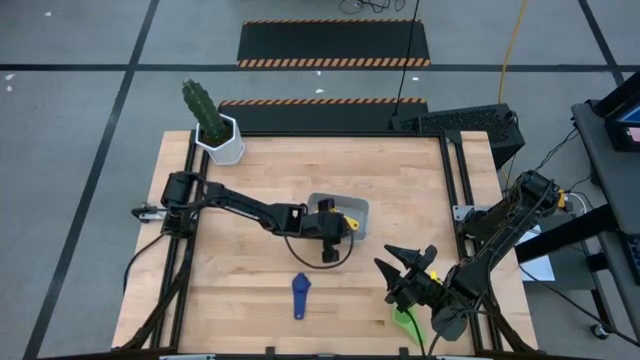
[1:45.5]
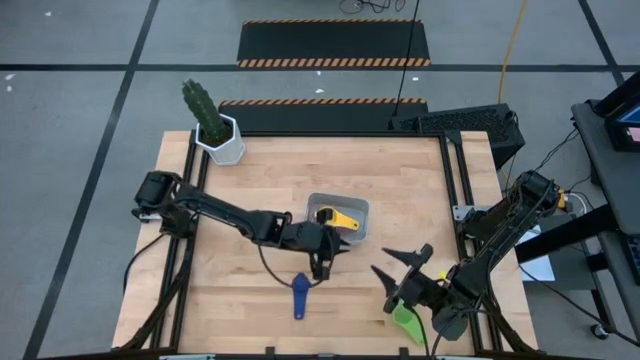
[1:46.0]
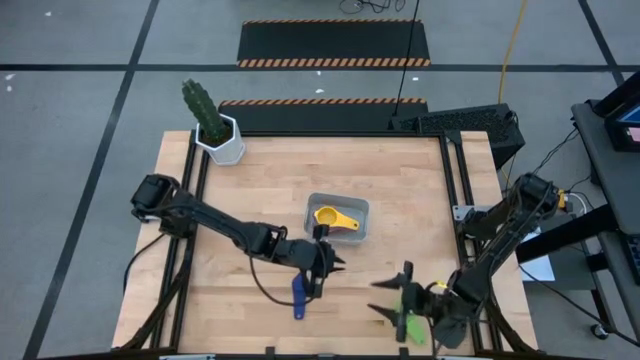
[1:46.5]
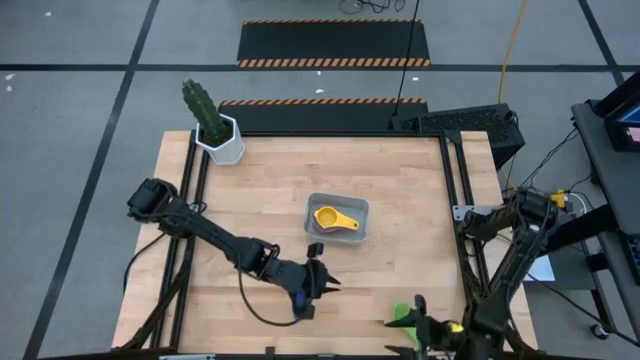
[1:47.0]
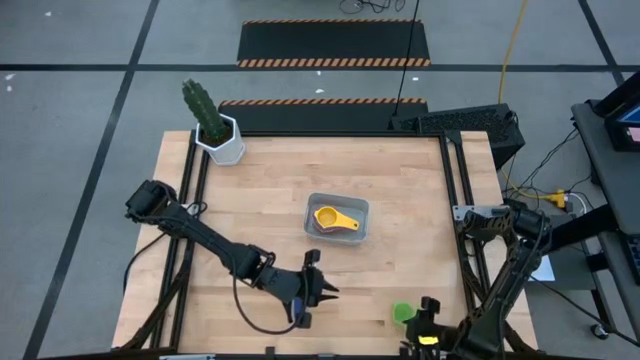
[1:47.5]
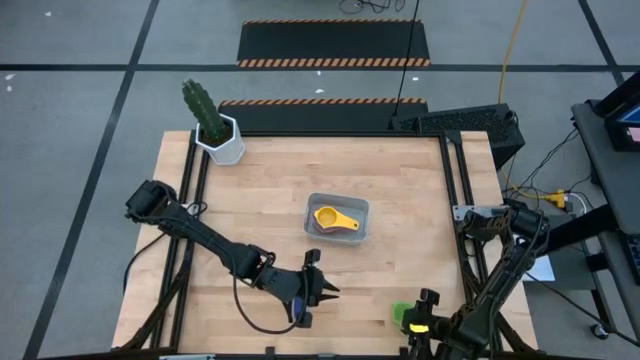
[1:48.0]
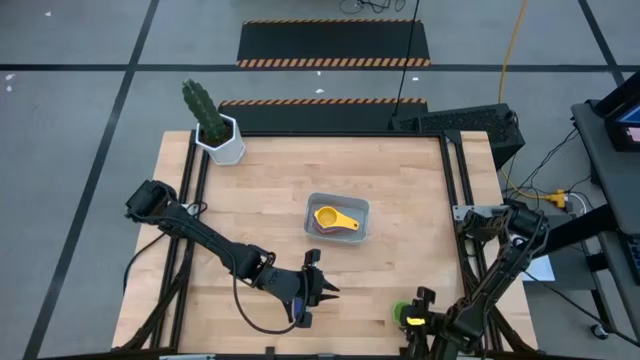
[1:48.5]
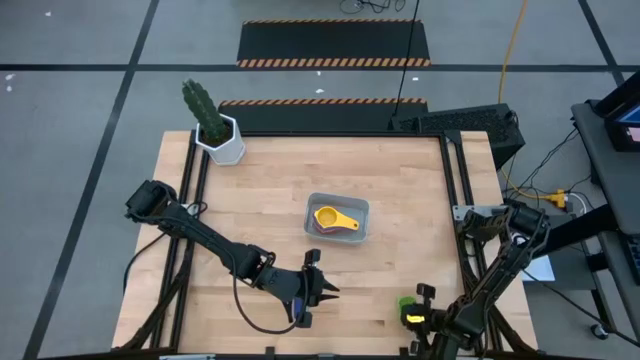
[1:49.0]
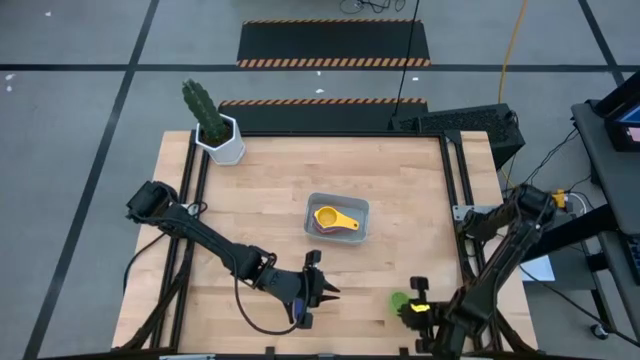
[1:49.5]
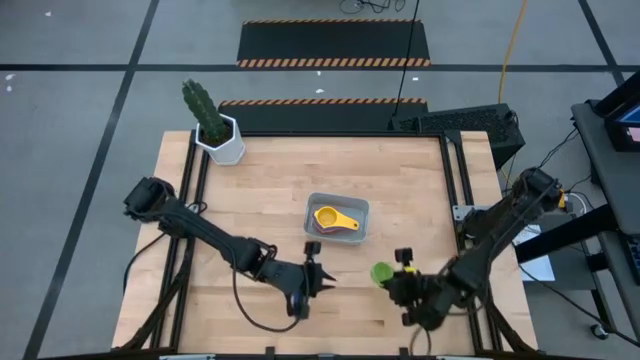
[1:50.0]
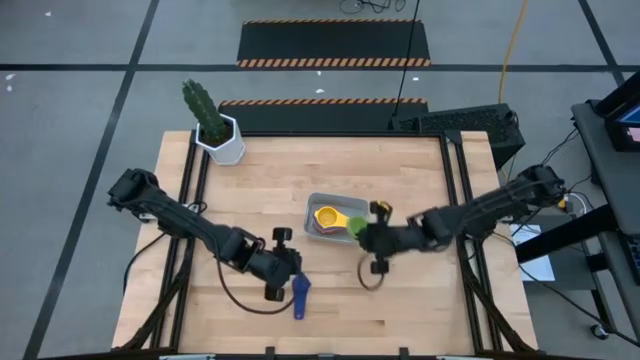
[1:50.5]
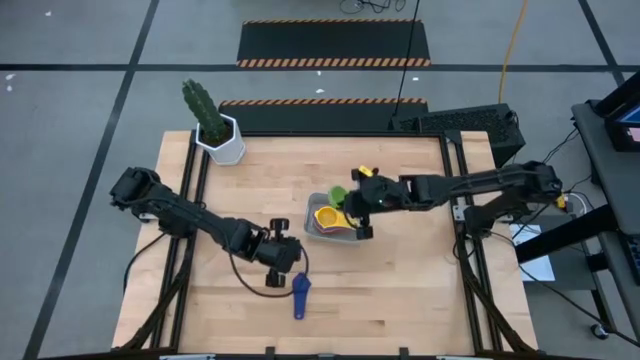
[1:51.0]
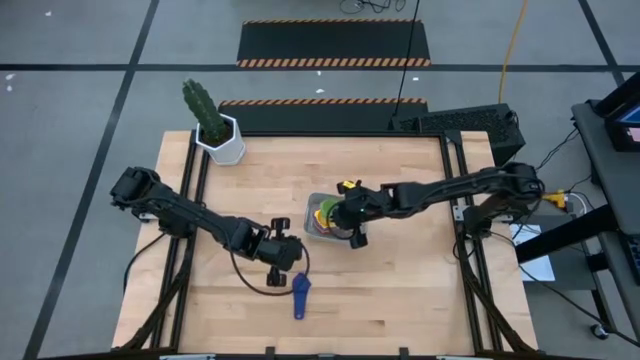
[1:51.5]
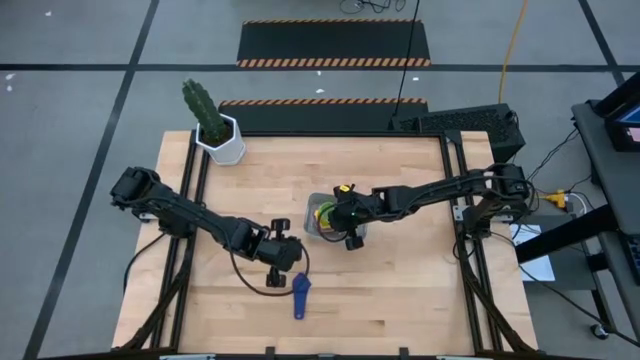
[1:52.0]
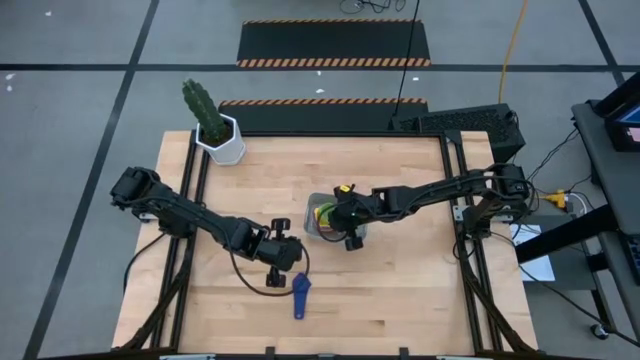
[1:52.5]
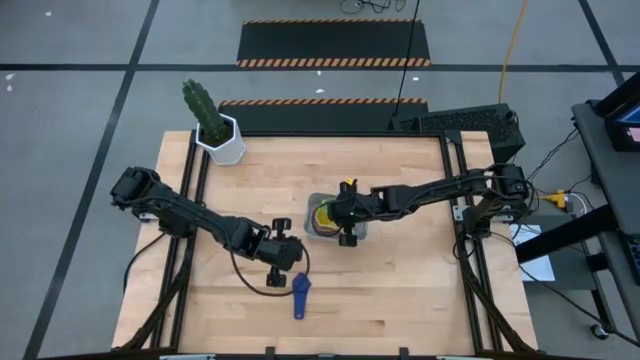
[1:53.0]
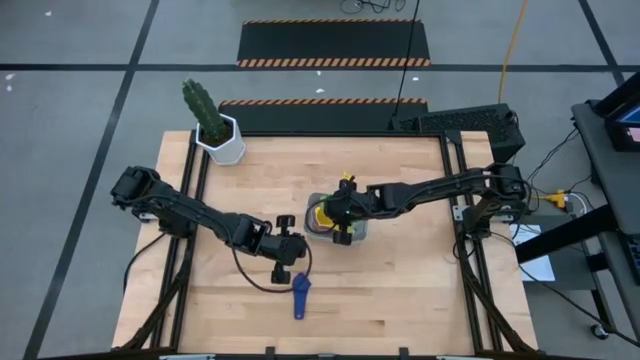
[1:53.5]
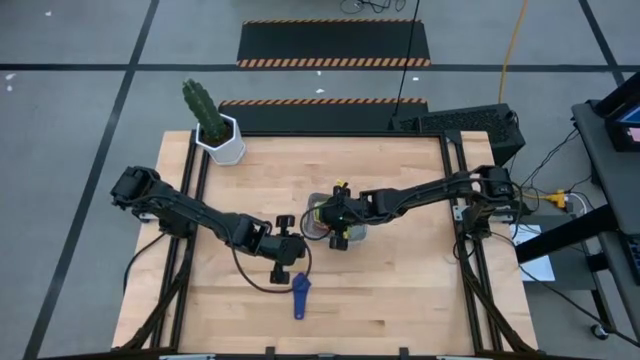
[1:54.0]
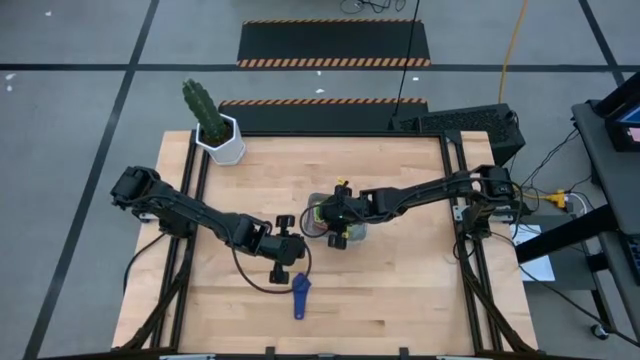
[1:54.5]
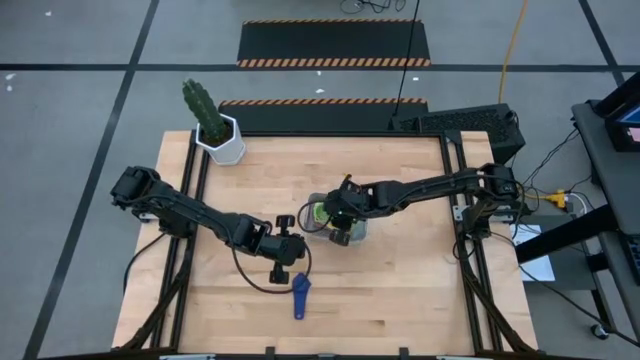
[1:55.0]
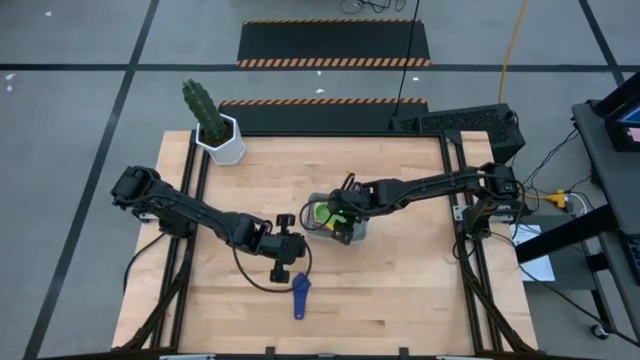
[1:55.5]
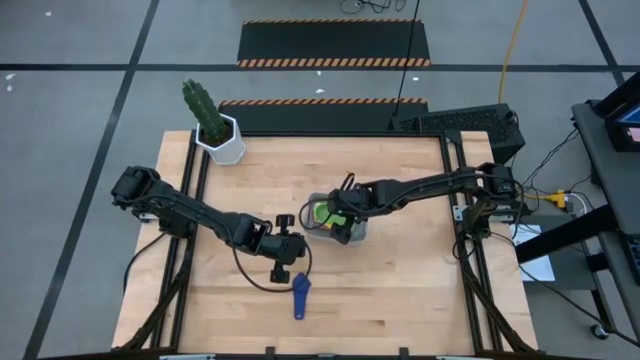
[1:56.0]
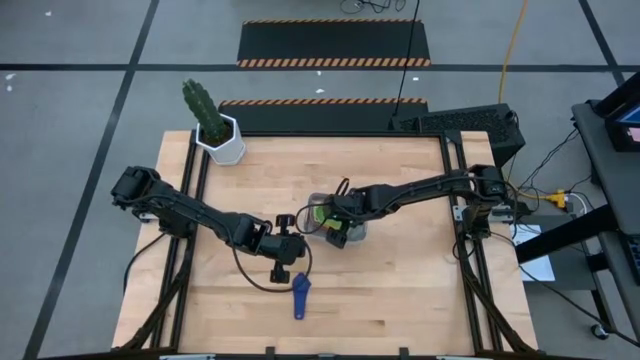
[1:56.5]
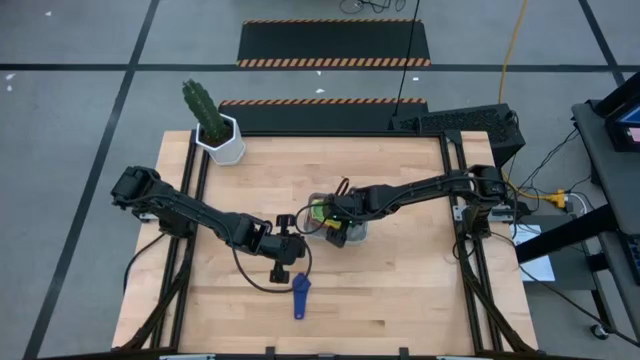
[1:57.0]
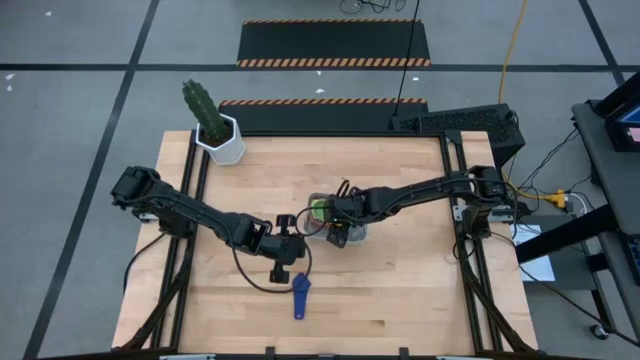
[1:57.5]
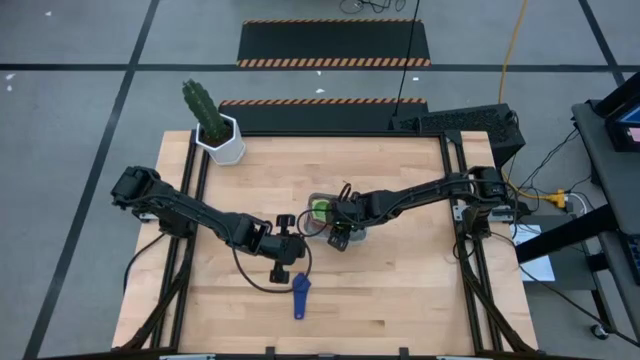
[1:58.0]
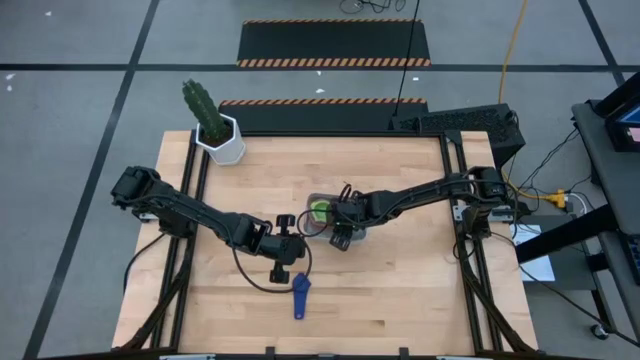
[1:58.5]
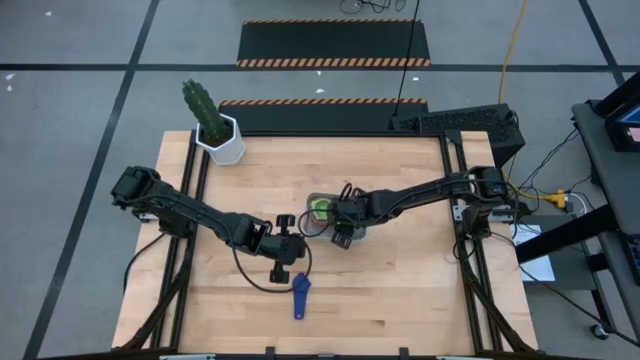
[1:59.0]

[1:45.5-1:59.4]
Task: Nest measuring cups in basket
Stack the green measuring cup into the yellow measuring cup

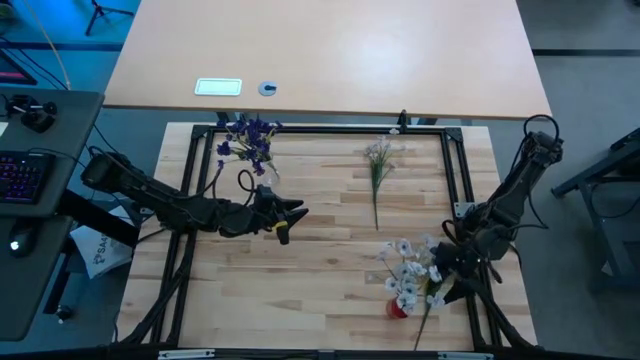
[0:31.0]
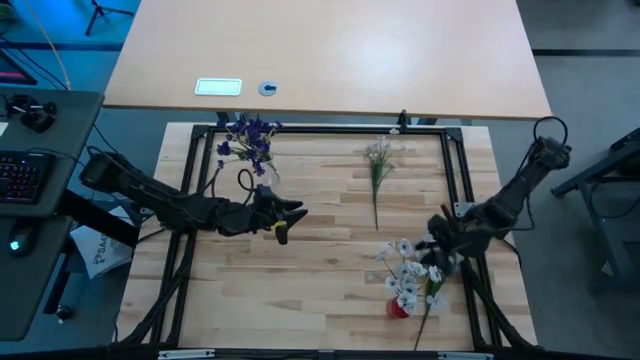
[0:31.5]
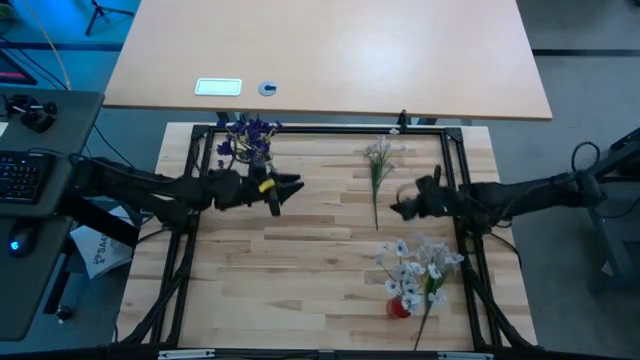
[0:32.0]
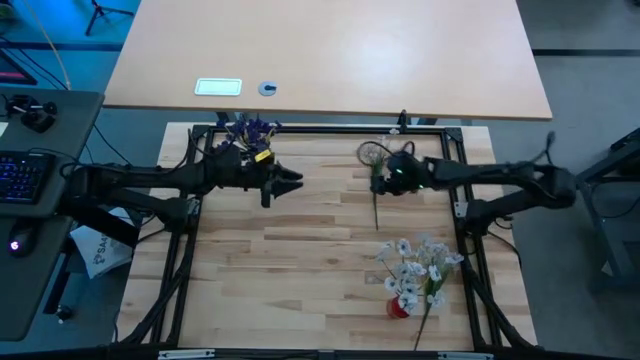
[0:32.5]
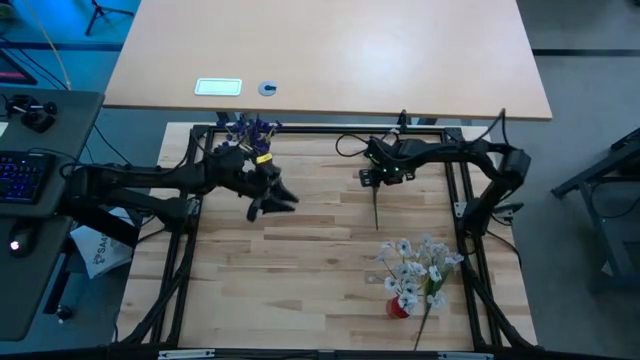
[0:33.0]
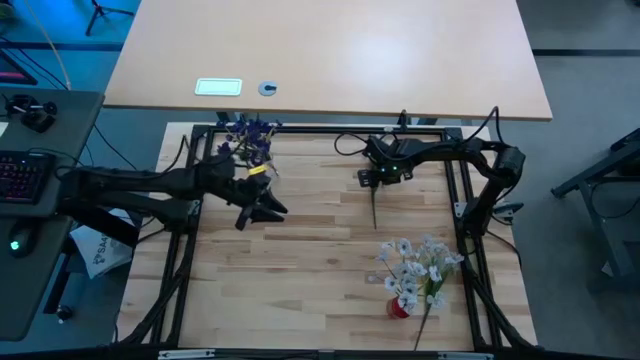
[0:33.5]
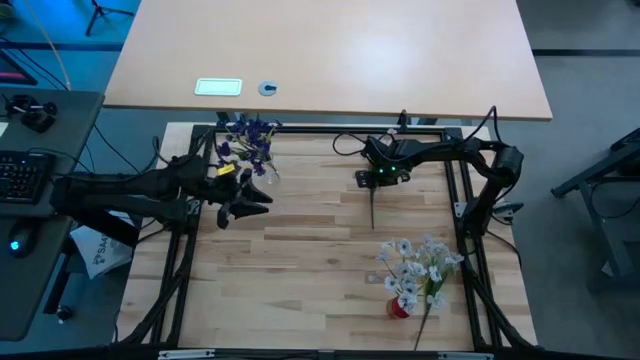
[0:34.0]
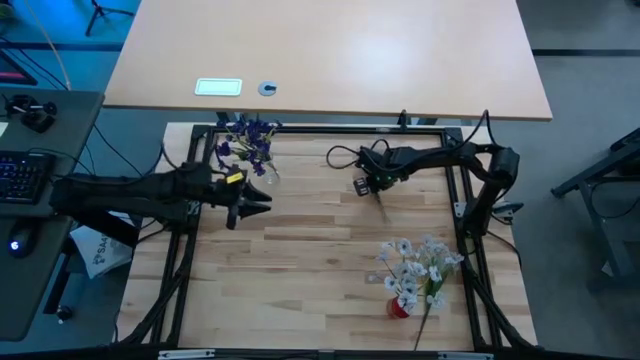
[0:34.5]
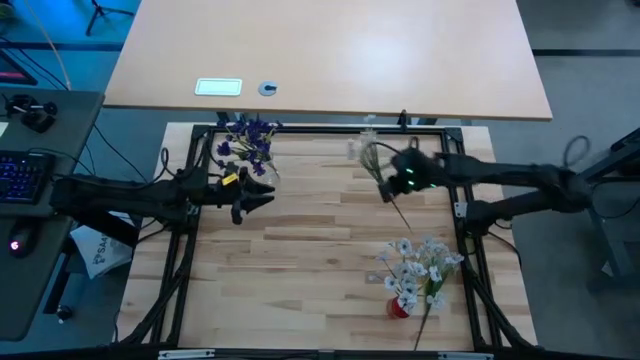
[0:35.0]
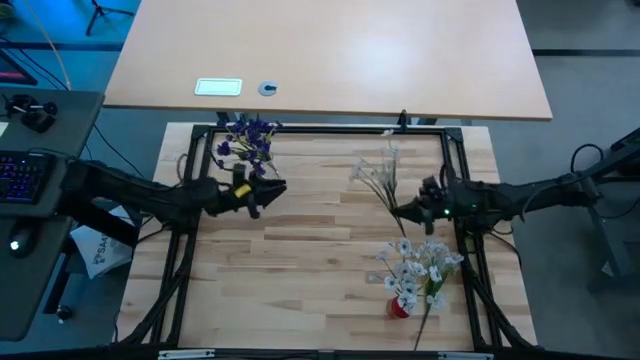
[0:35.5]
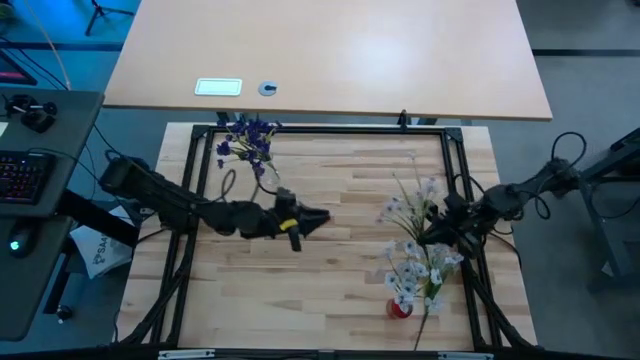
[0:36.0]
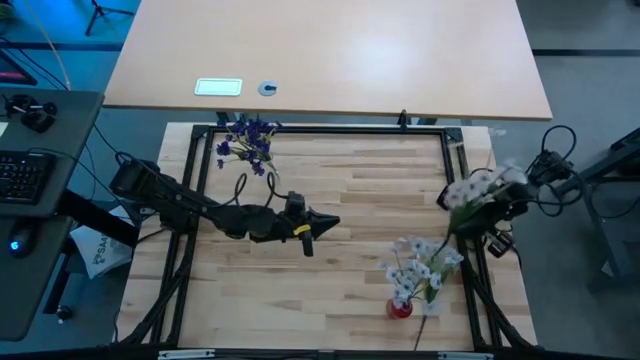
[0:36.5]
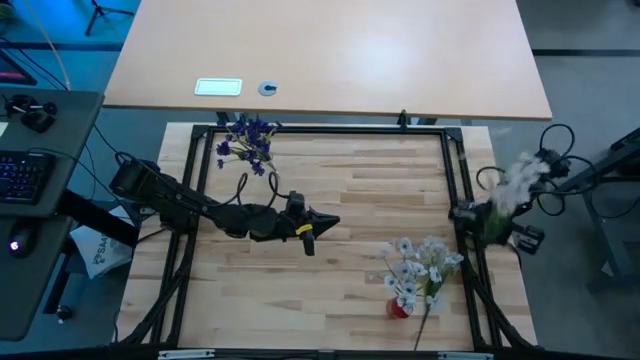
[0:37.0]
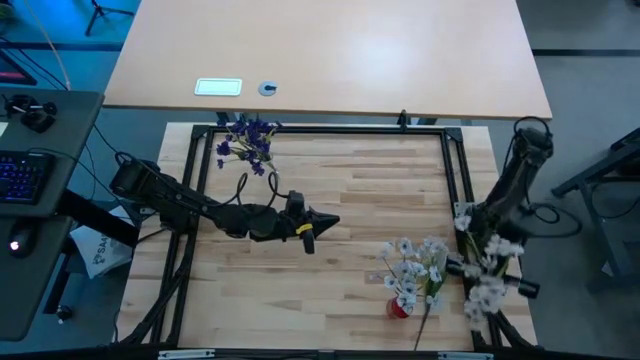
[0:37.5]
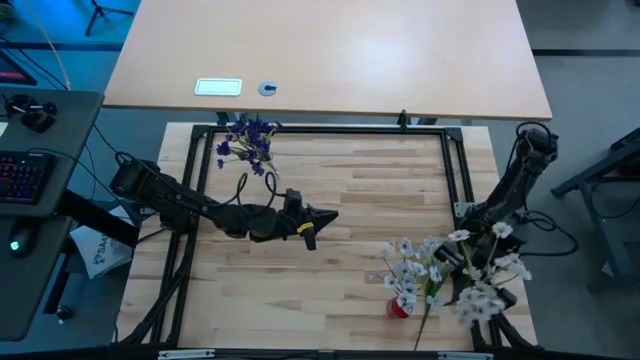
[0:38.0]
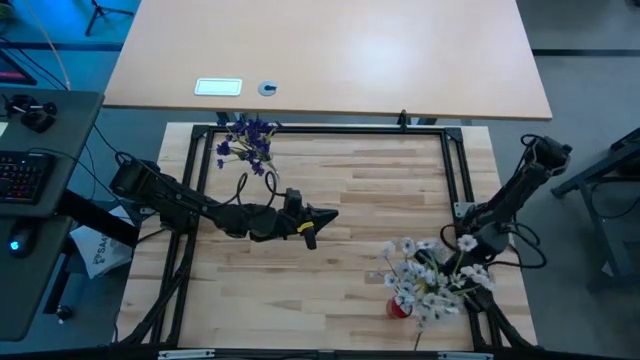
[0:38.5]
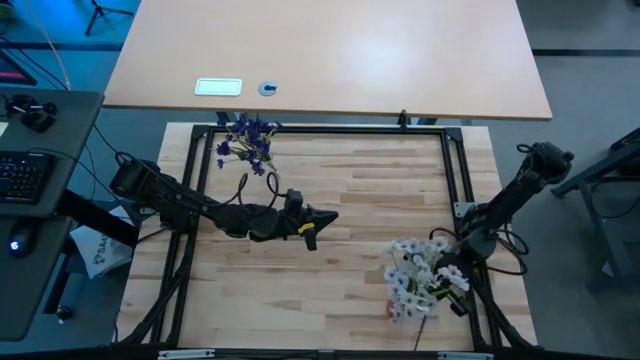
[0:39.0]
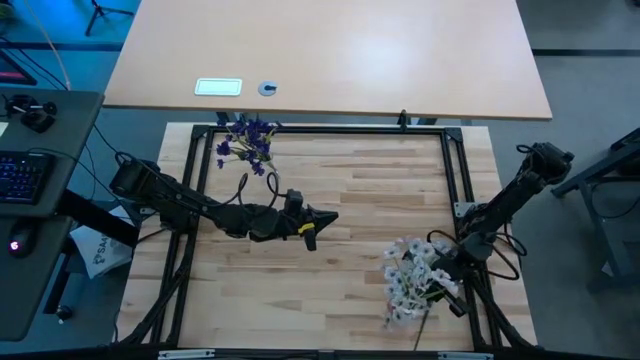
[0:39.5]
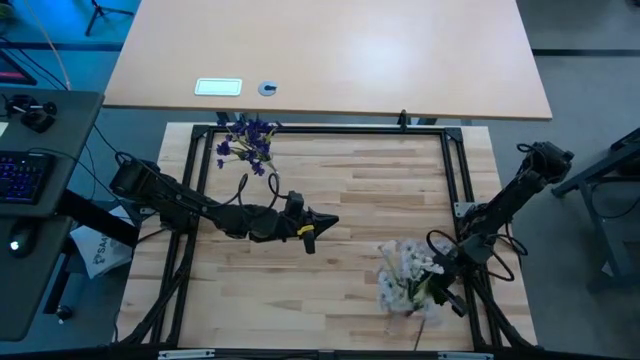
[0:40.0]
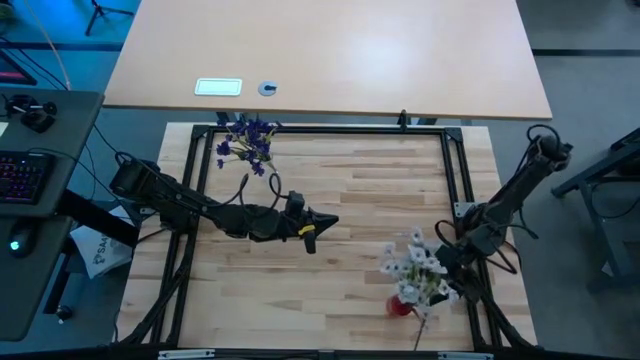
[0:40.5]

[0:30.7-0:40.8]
Task: Sort flowers into vase by color
Put the top white flowers into the red vase
